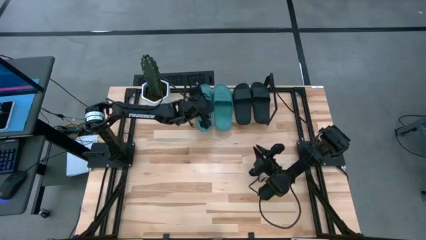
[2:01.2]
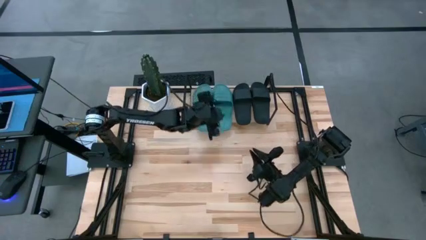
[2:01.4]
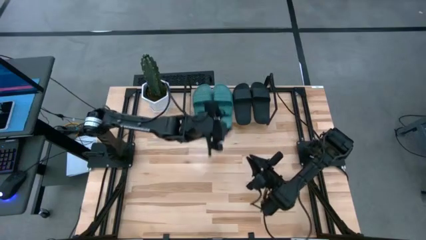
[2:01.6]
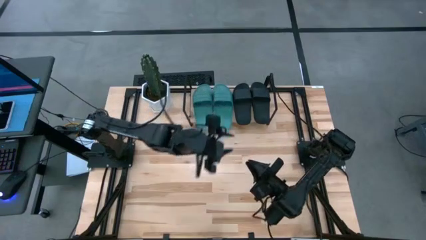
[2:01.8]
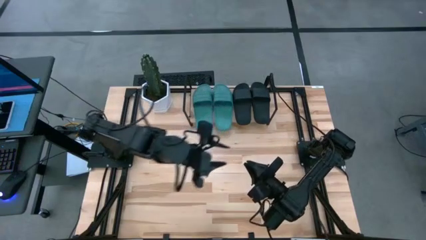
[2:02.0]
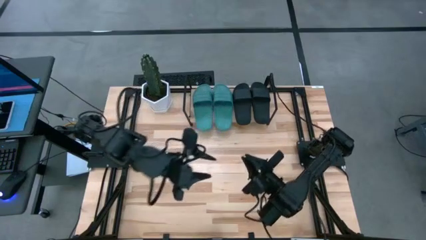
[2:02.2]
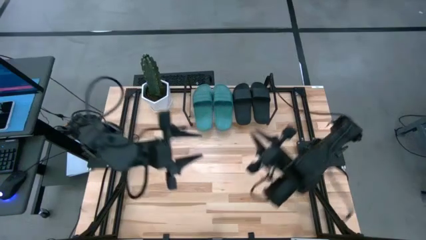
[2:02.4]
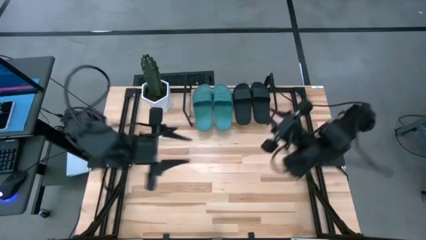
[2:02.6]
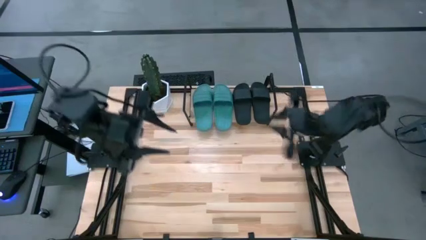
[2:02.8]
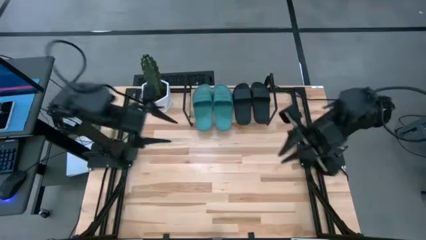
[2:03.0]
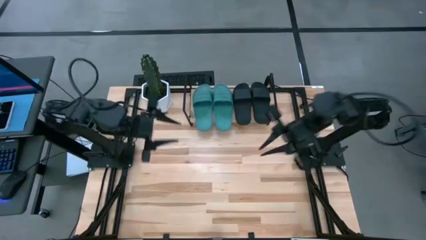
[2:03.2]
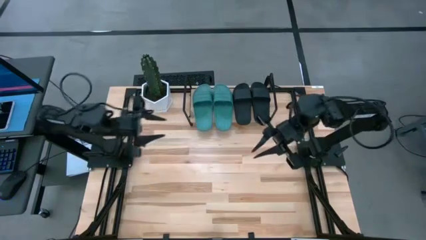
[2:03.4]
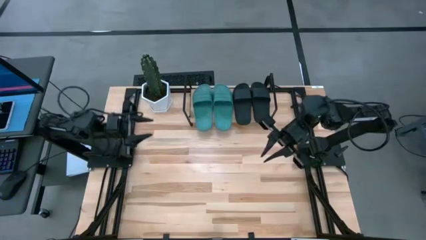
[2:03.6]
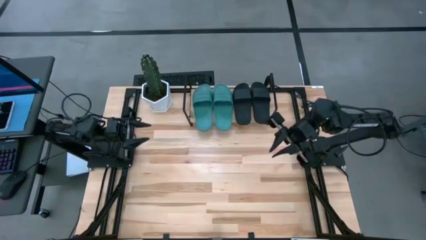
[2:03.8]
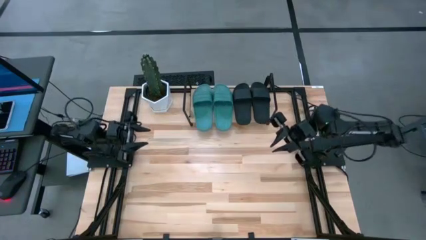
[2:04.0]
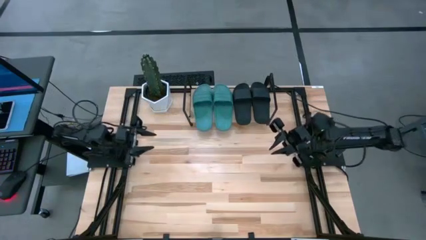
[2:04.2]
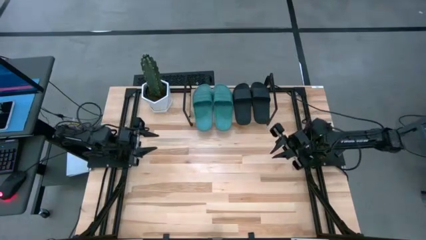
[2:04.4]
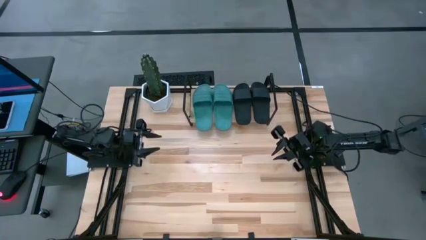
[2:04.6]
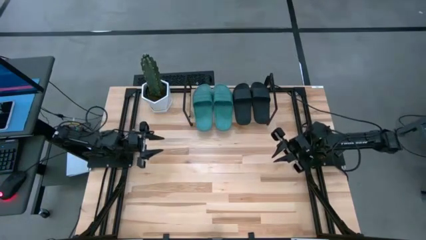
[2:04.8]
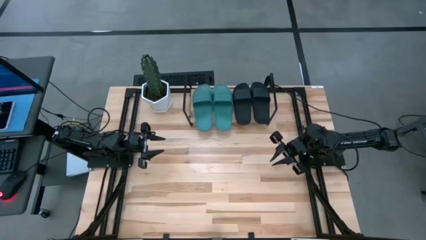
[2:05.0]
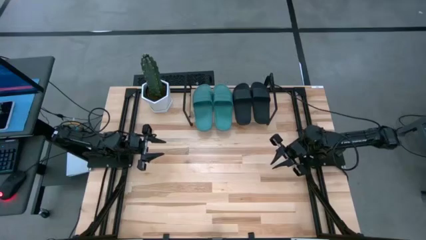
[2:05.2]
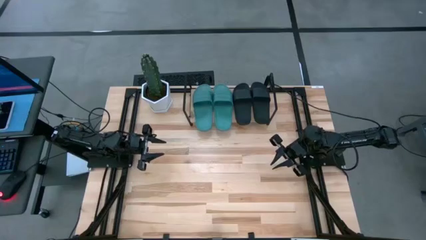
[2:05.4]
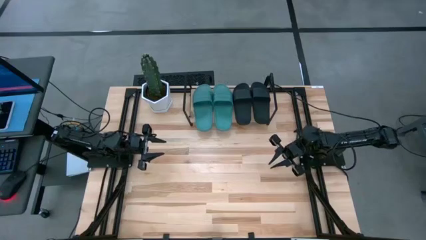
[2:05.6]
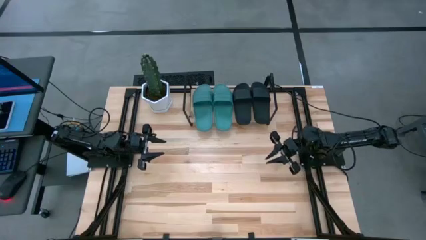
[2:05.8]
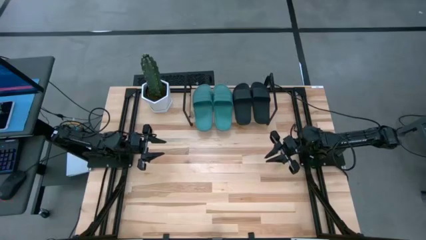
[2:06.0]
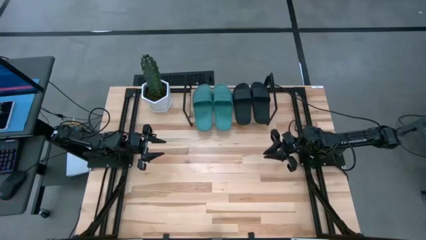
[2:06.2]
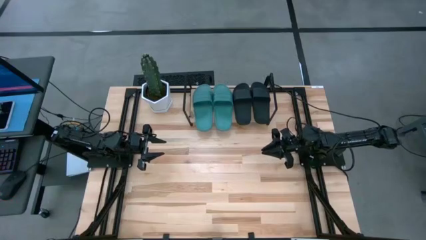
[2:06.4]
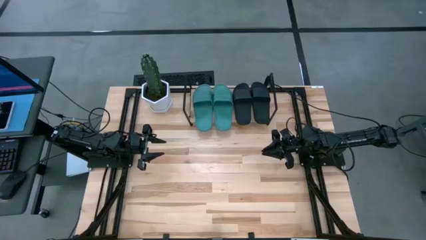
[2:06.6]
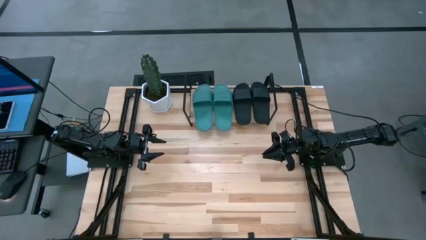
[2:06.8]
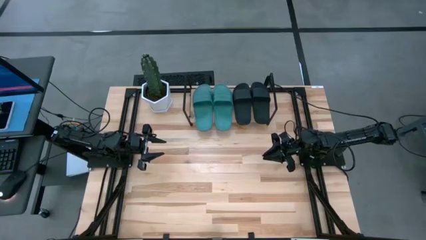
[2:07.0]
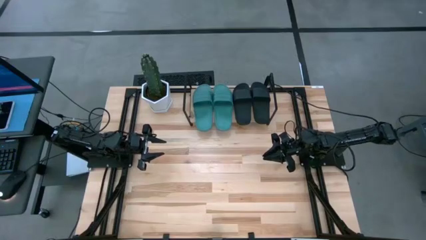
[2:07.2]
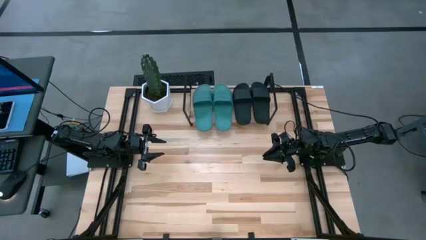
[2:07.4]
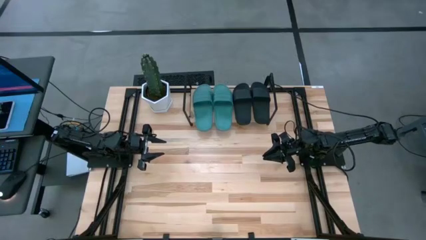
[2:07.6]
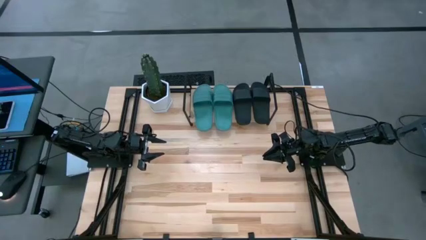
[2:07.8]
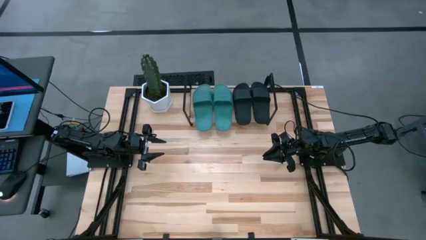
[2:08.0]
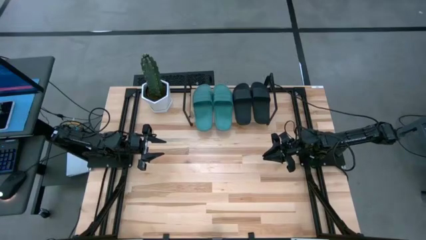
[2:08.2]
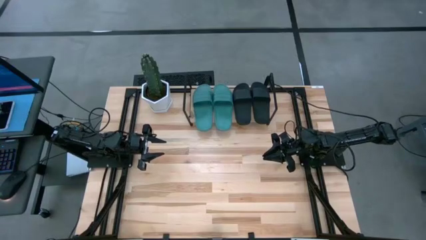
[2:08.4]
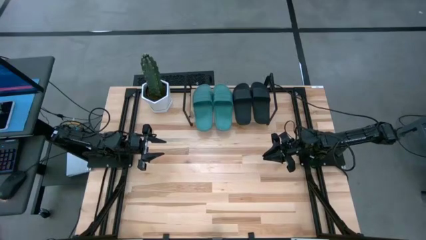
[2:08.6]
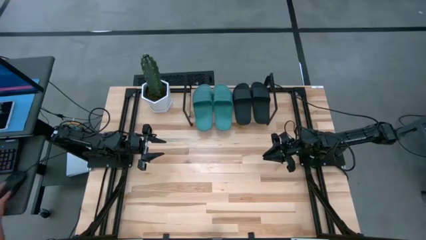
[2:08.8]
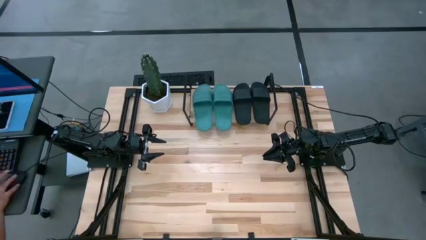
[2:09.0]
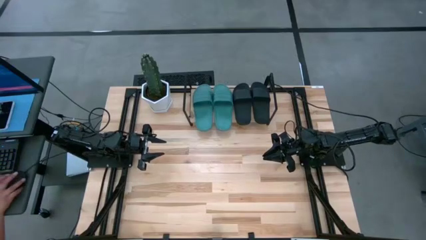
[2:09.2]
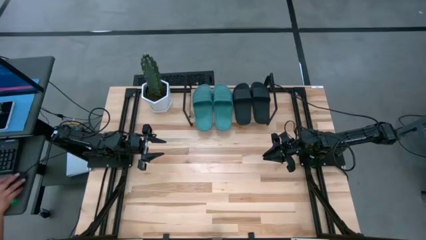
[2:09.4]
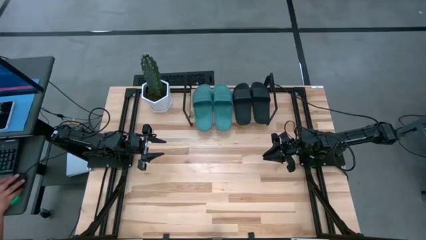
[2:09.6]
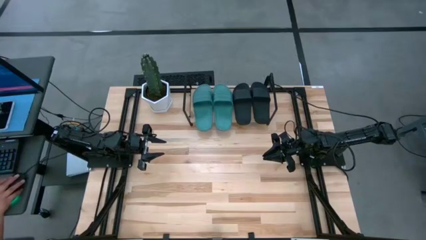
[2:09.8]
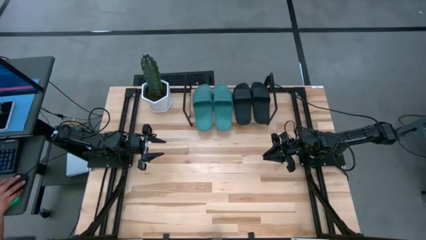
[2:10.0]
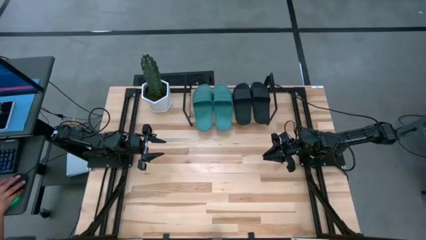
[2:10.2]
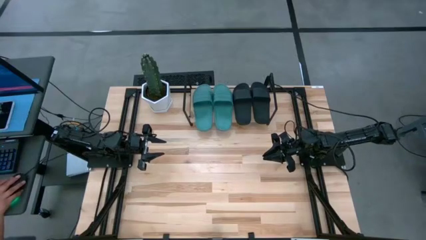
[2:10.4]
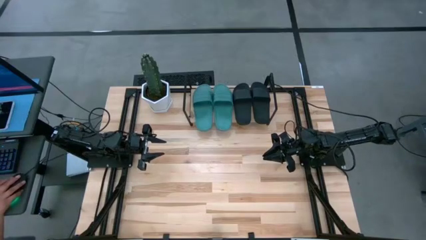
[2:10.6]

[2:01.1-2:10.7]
Task: Pick and place slides into the shelf
Return to Home Position
